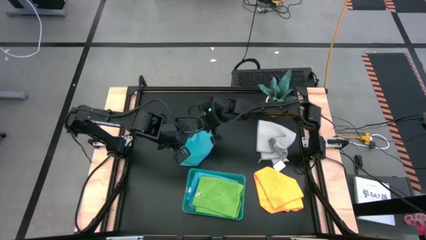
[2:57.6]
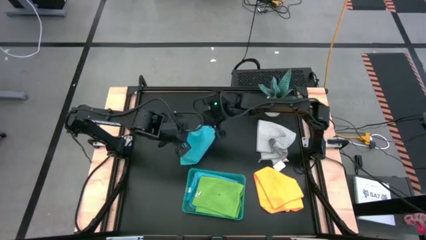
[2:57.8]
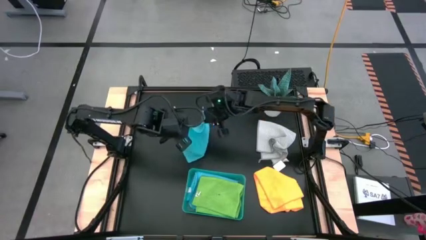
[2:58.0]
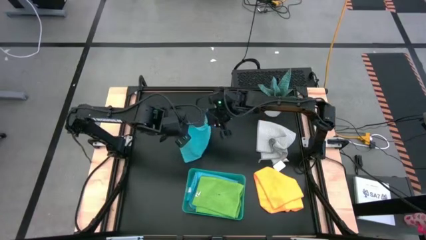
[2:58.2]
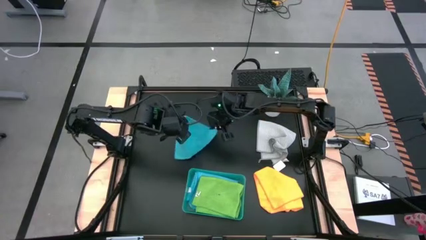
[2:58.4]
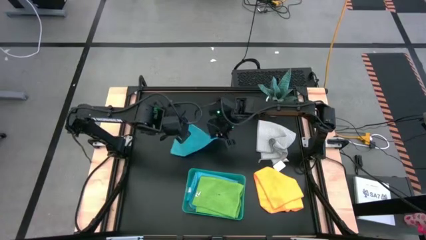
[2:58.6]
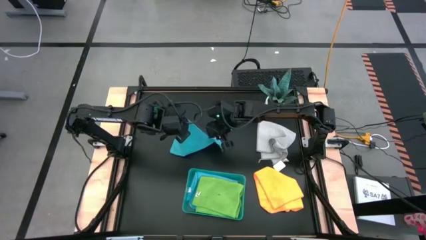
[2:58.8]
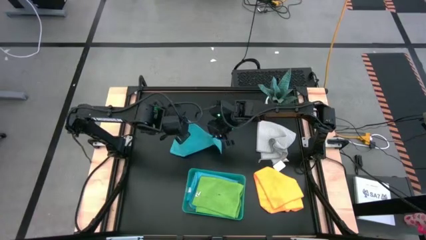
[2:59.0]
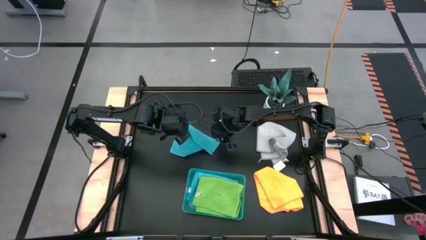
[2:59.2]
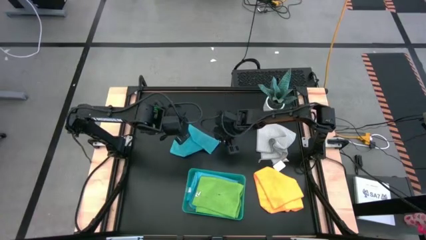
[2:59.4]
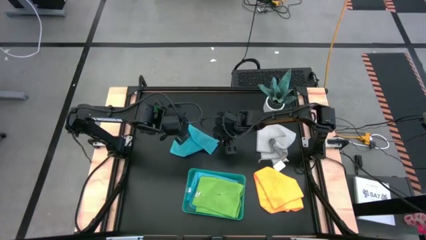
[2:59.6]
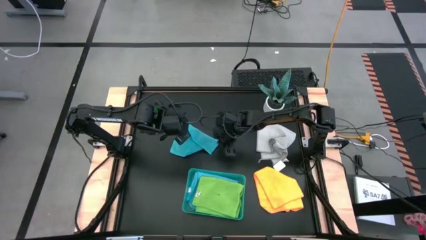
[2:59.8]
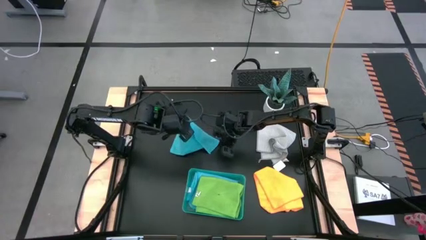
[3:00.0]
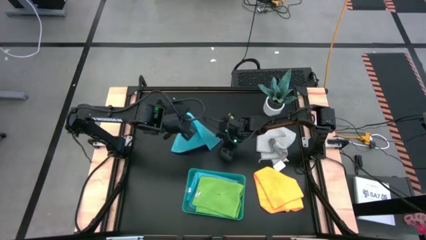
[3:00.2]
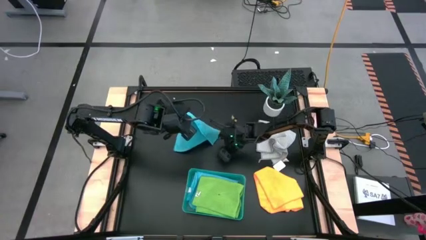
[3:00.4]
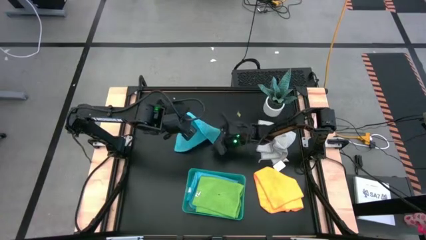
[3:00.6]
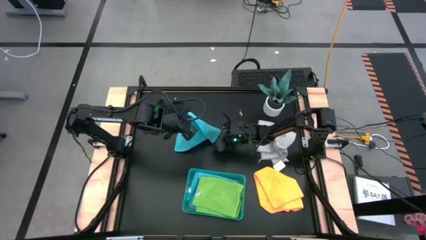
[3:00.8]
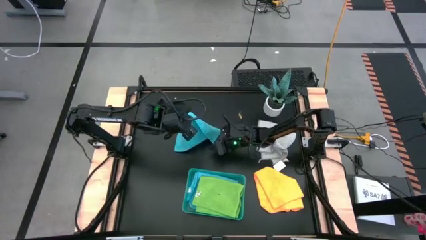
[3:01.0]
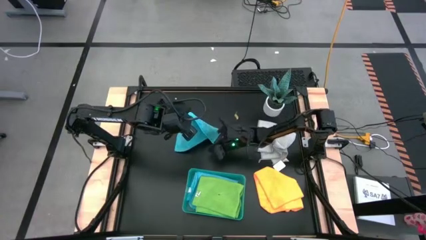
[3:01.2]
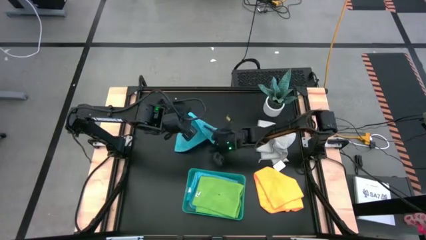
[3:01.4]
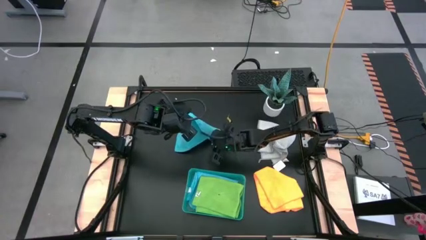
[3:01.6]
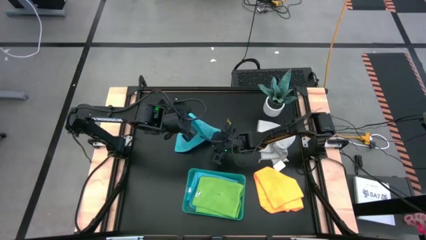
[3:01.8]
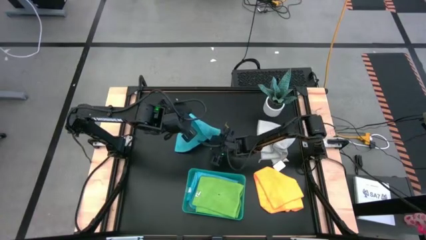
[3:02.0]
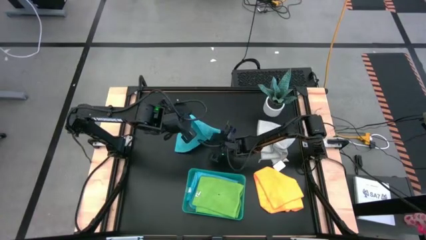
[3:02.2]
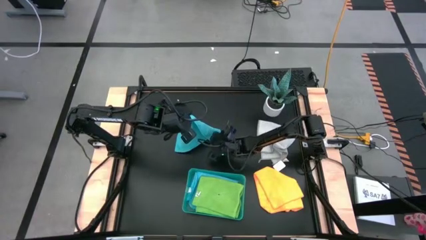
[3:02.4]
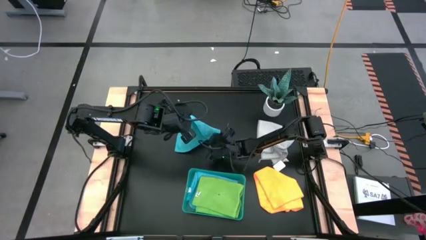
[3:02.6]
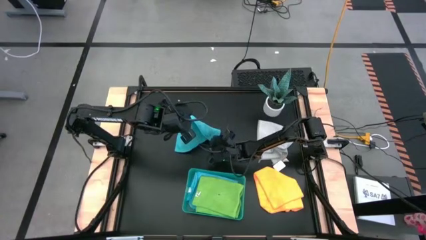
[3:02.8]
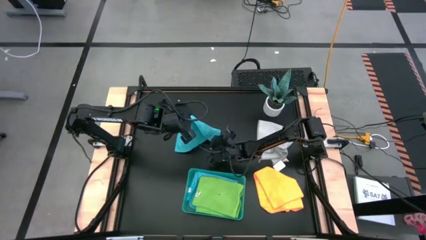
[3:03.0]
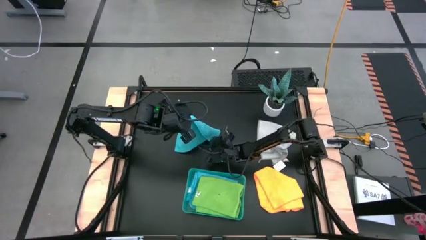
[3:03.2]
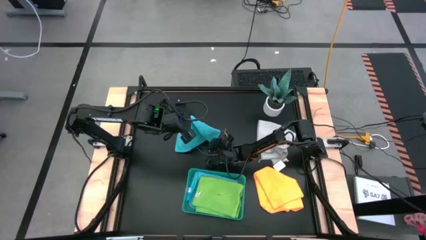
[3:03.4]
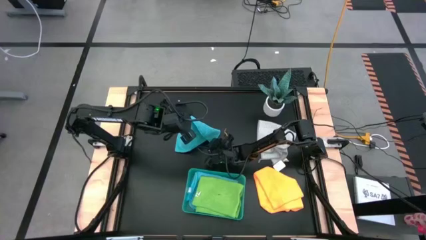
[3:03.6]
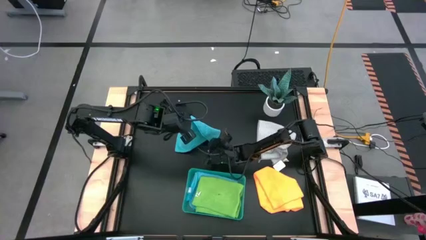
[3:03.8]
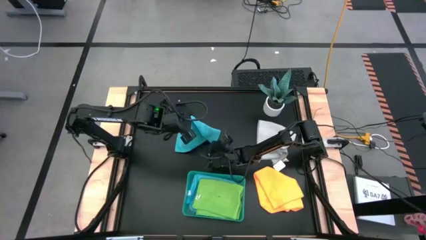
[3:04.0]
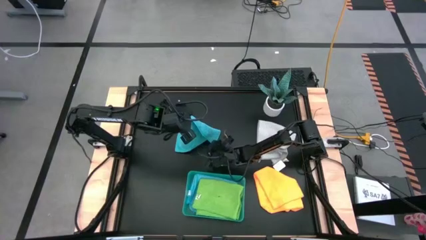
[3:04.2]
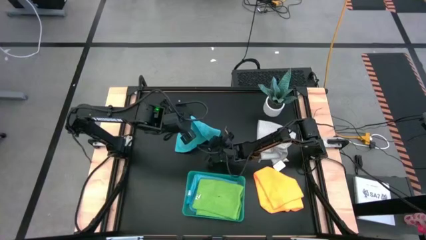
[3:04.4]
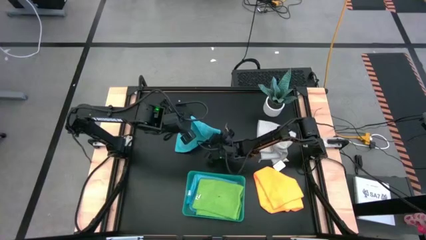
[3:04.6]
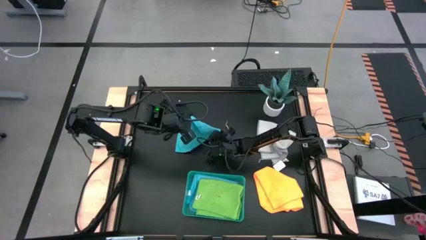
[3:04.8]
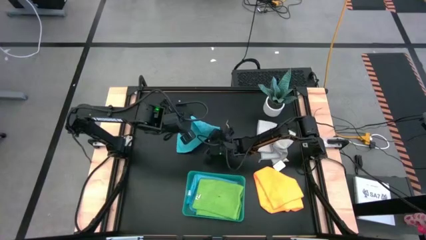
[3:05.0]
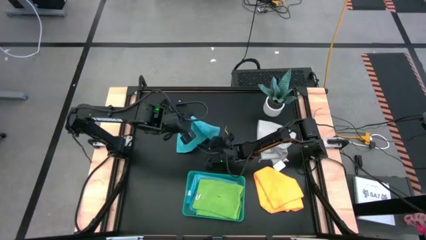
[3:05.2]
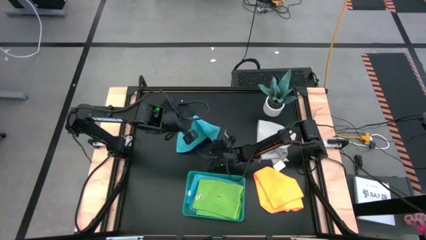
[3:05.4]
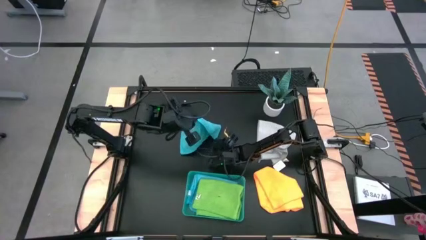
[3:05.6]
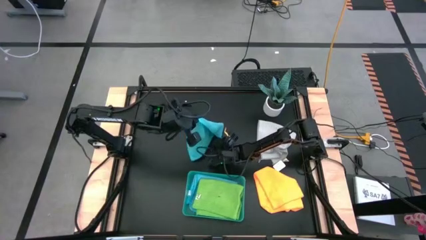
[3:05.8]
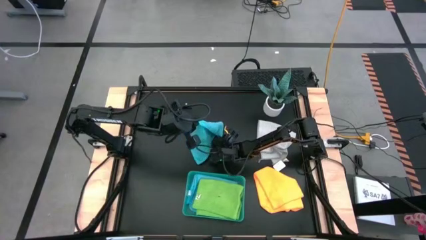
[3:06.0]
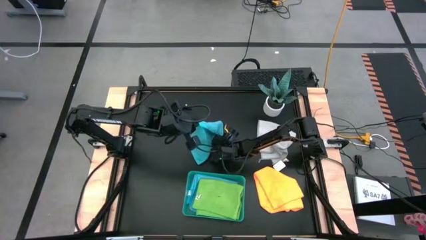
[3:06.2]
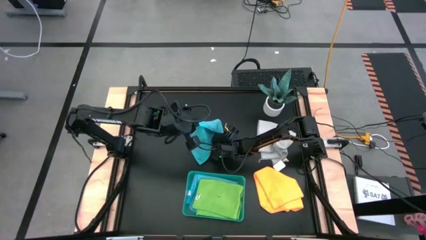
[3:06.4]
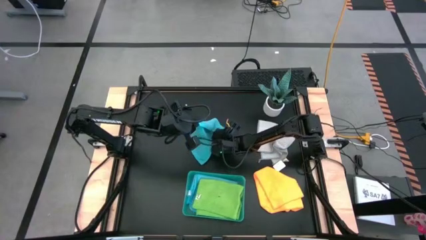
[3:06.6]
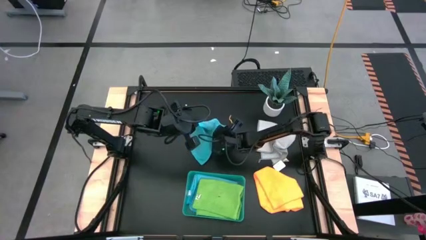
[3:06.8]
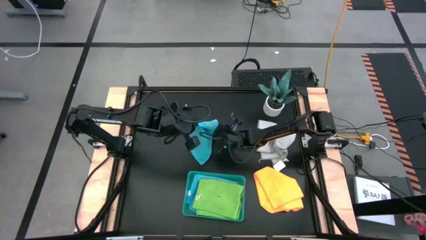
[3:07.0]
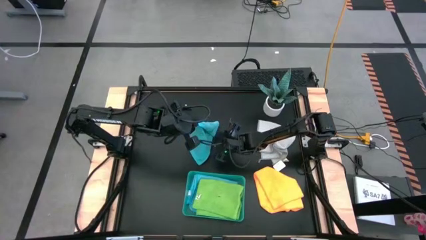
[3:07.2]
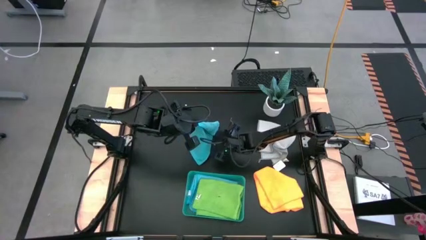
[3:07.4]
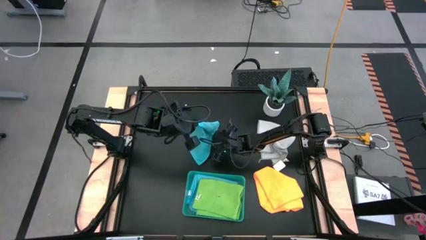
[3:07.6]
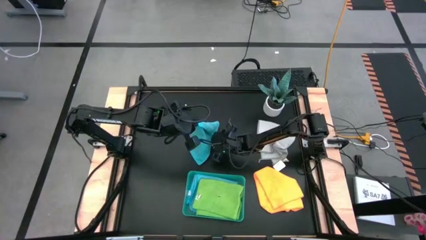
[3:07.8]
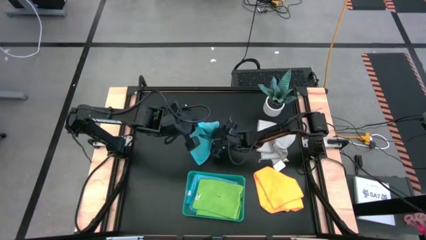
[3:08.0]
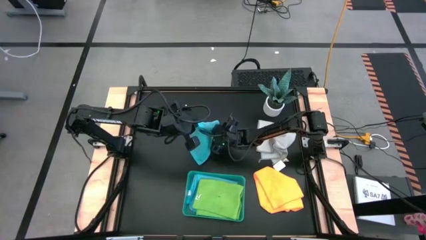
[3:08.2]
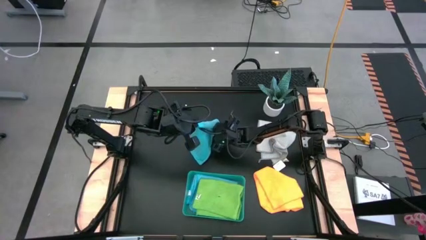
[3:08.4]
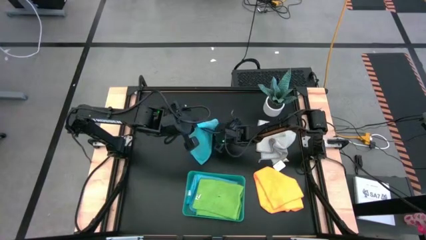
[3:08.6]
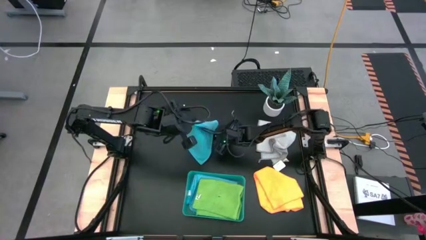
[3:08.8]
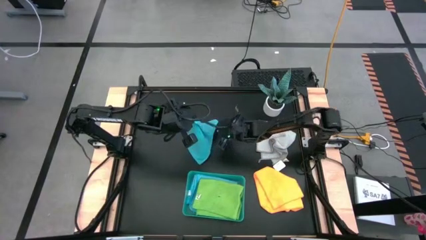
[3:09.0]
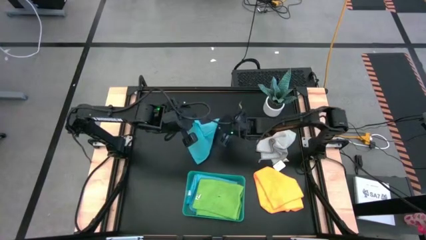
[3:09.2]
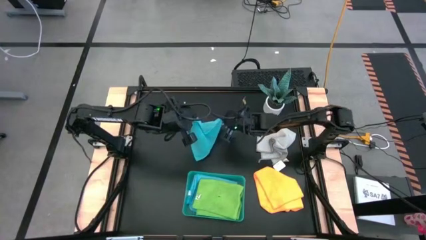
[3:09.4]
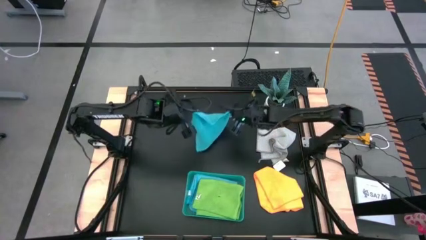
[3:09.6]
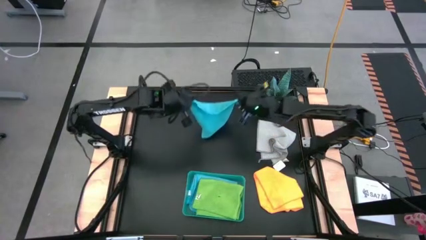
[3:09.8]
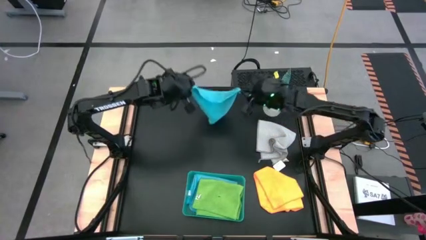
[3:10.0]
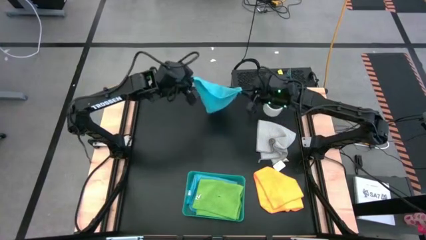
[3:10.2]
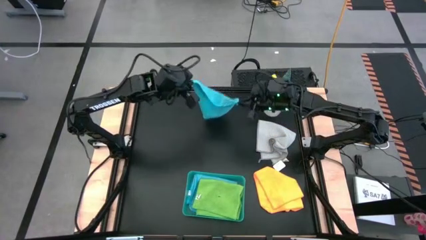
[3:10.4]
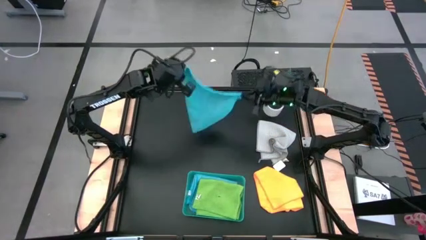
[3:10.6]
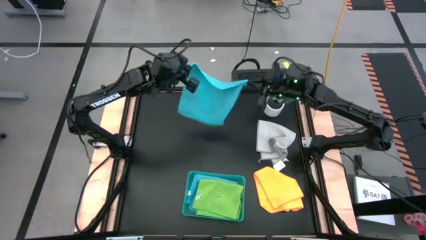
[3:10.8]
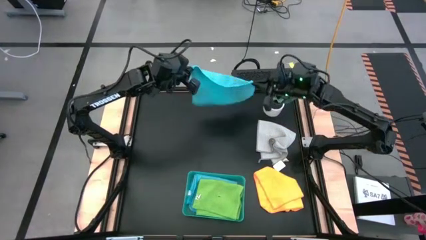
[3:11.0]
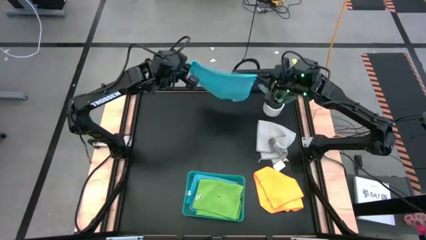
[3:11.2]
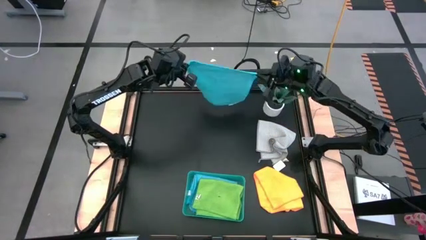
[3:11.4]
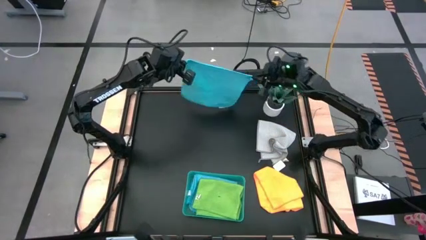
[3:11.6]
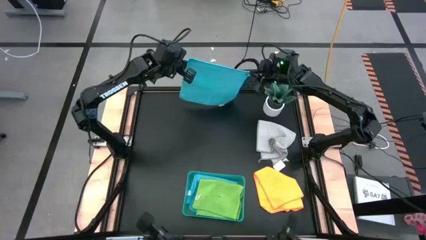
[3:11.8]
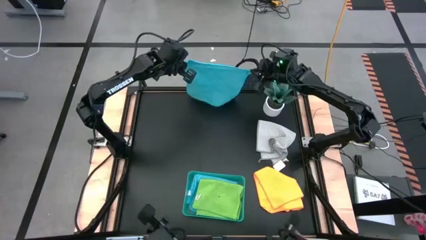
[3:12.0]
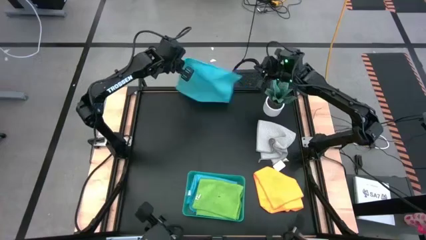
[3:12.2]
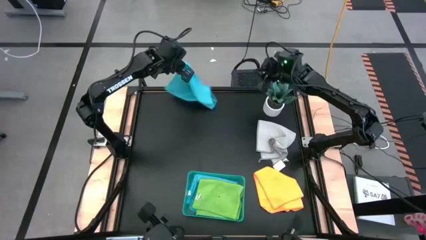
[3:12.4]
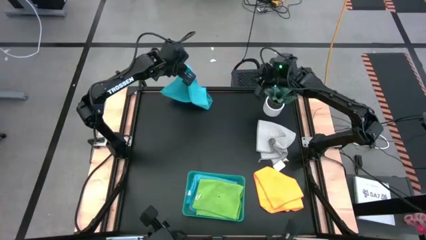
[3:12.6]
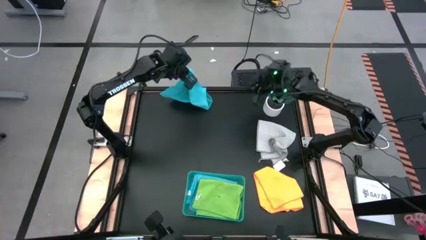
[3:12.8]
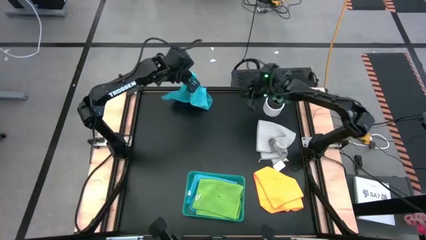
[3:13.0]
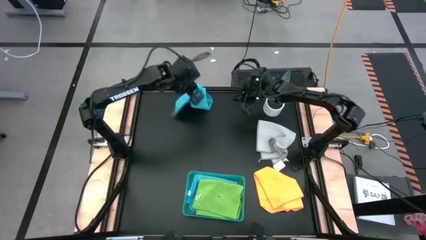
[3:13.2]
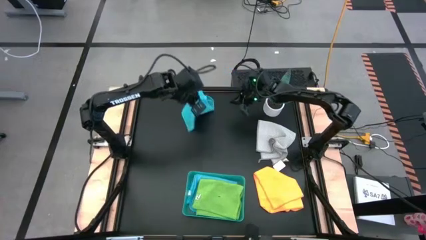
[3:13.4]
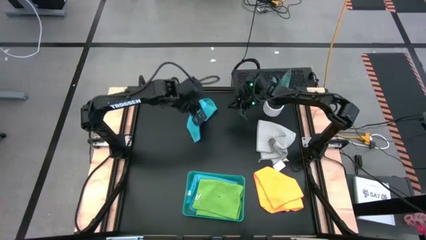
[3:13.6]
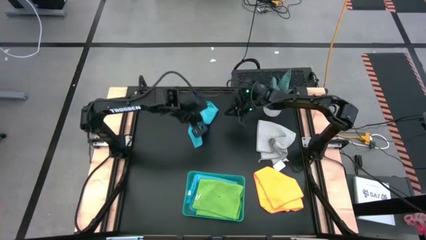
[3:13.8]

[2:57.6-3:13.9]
Task: Fold microfiber towels
Fold the blue microfiber cloth into a quarter
